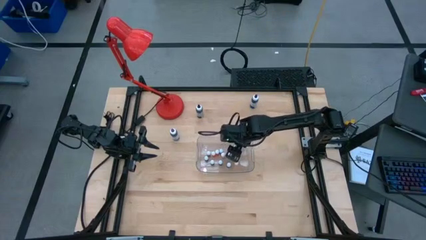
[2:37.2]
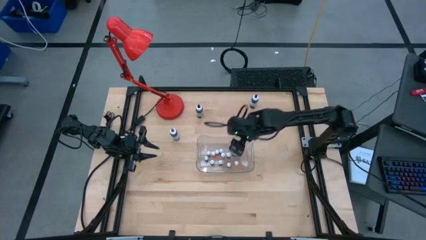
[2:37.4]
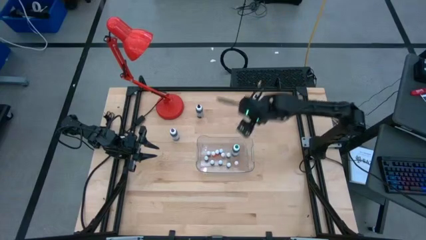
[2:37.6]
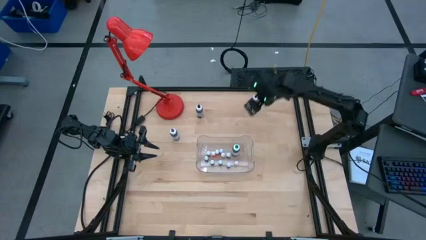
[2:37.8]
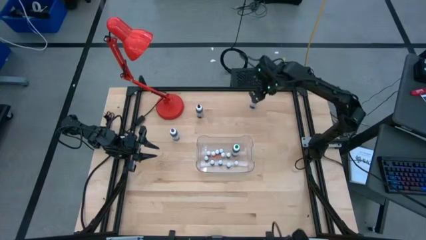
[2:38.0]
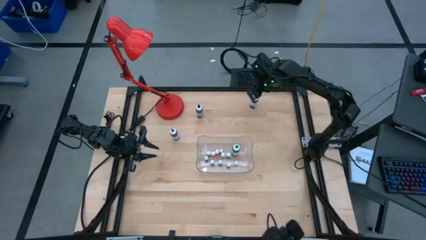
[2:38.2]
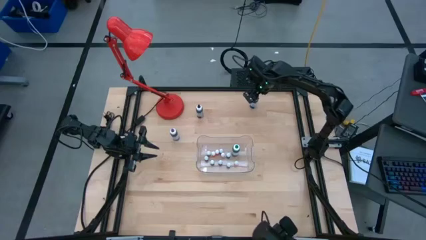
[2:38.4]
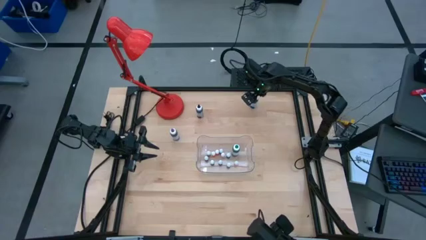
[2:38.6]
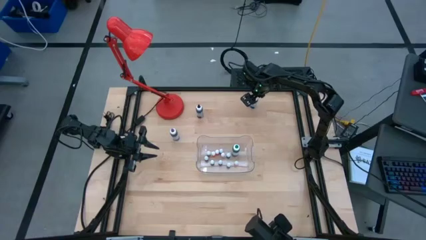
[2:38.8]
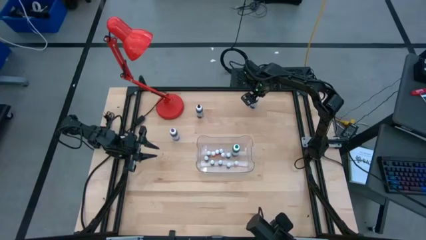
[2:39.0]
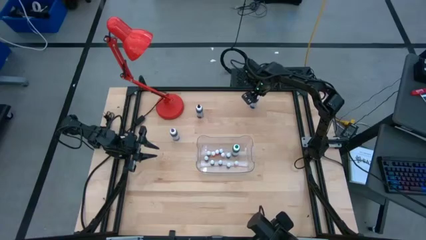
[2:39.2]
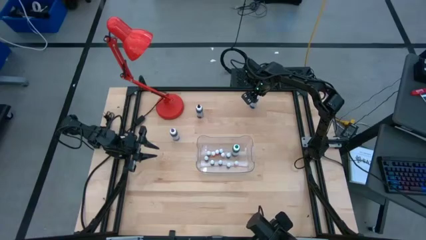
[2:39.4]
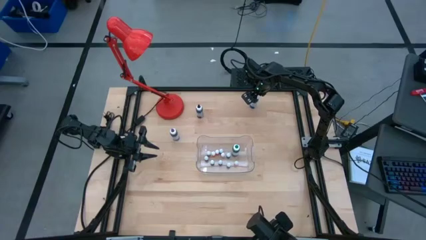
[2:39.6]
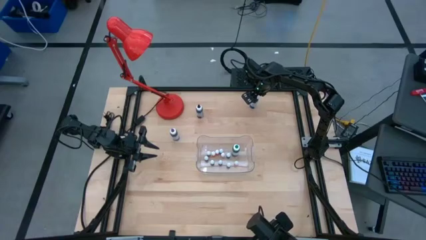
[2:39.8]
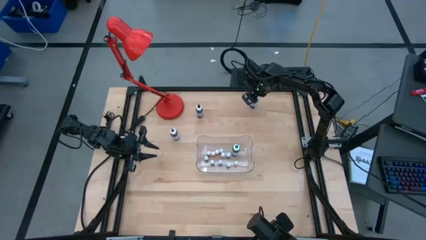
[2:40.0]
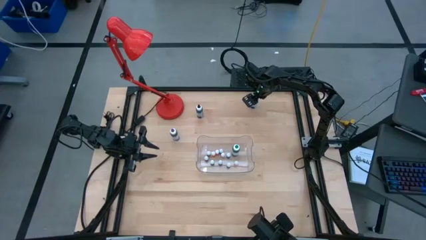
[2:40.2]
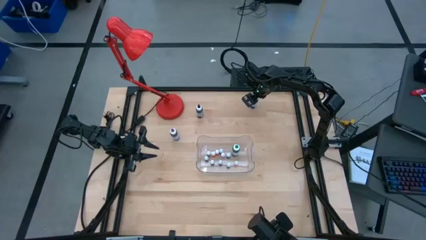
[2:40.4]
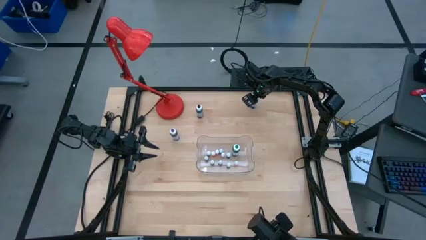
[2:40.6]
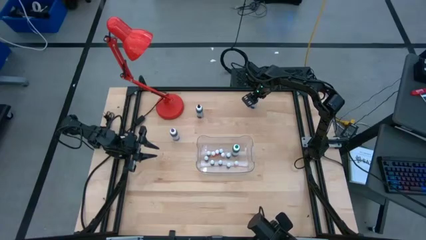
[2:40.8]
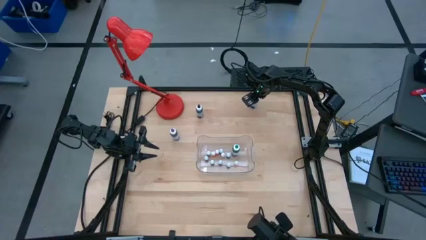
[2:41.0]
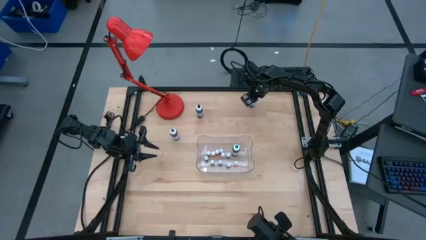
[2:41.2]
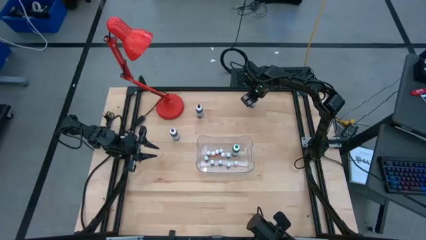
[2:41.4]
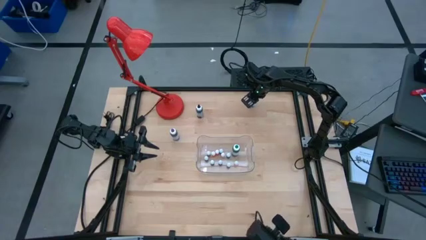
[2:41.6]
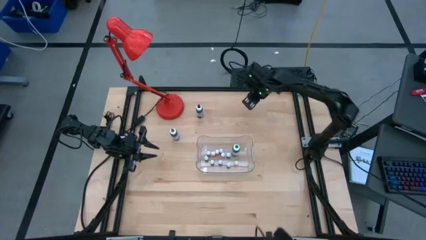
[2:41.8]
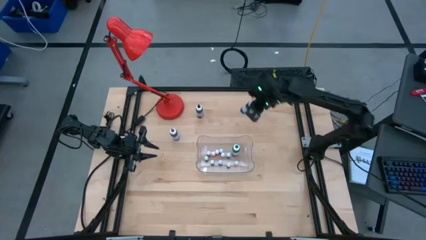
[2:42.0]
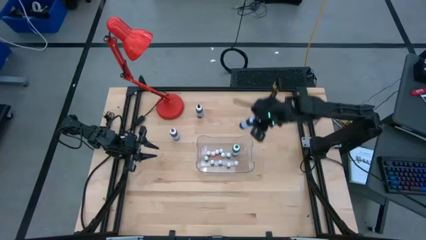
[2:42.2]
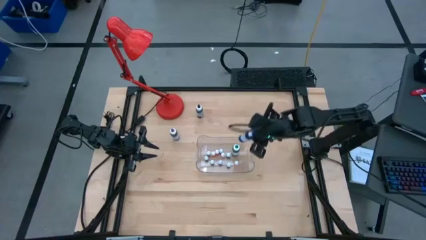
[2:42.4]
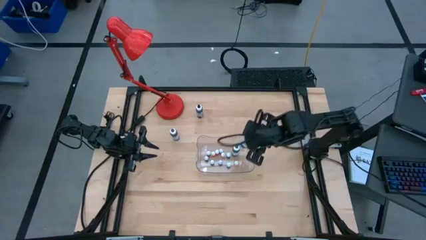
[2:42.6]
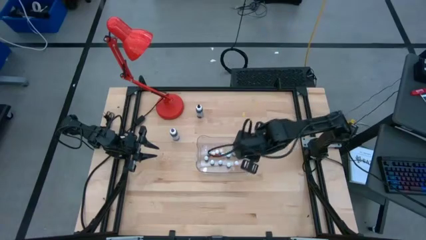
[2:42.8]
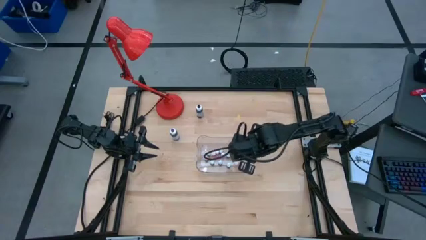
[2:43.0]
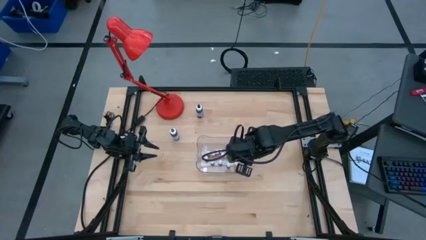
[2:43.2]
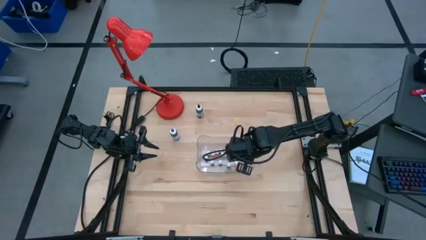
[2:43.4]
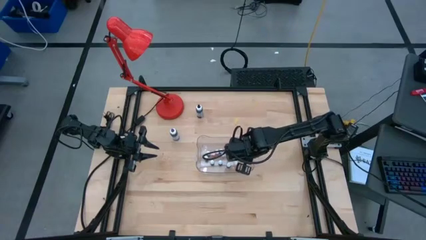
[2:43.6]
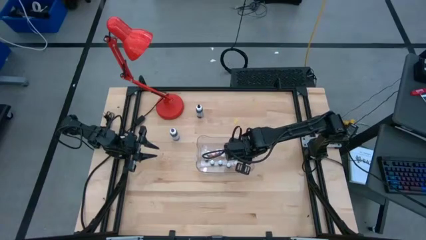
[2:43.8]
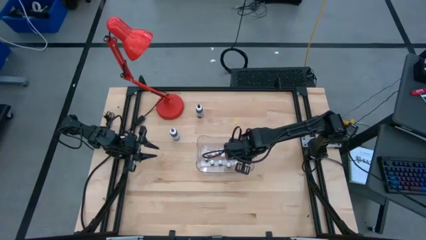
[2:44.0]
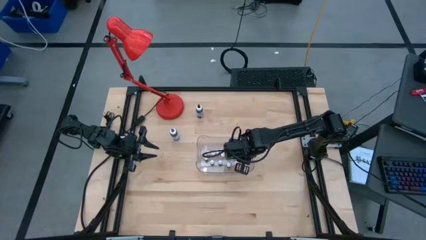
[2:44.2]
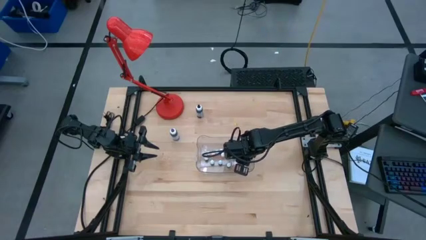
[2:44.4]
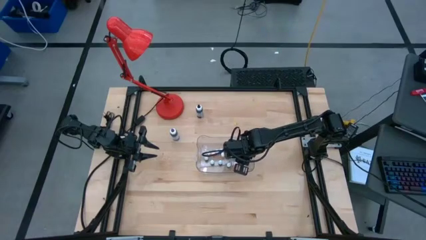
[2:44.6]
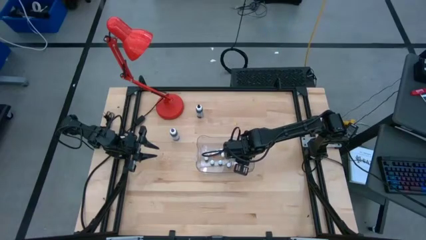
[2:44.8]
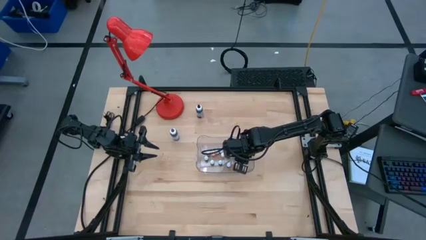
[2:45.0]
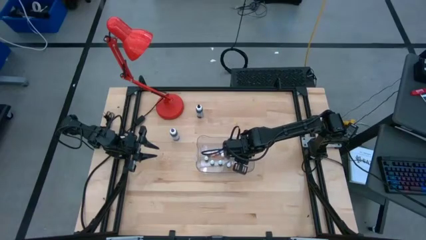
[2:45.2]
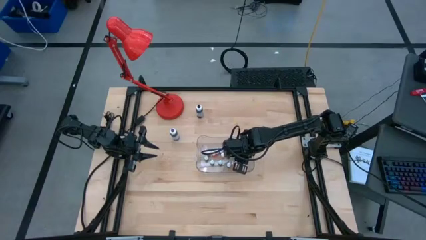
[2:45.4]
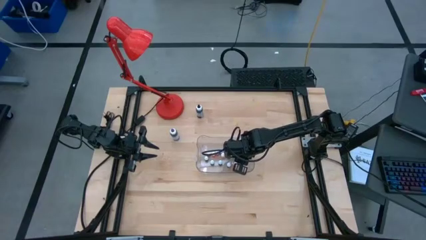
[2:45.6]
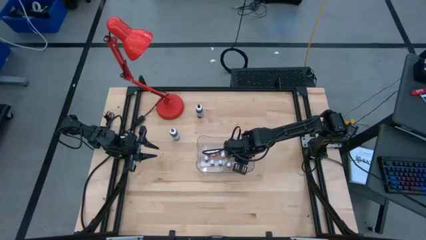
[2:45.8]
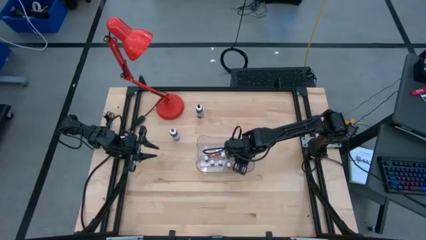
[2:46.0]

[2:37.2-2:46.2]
Task: Pick & Place food coloring
Put the large blue food coloring bottle into the transparent bin

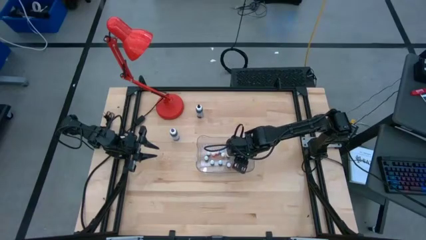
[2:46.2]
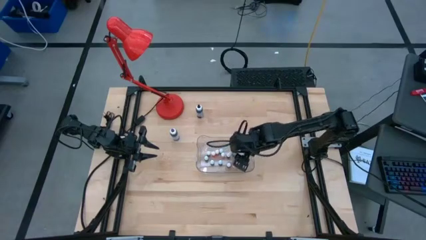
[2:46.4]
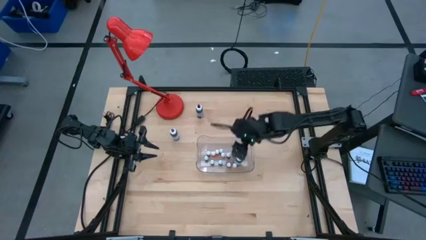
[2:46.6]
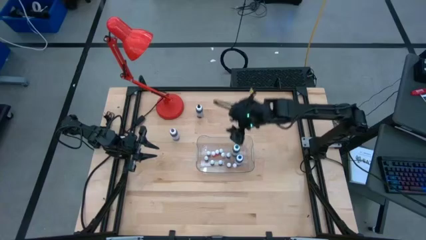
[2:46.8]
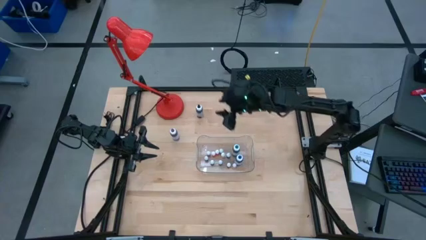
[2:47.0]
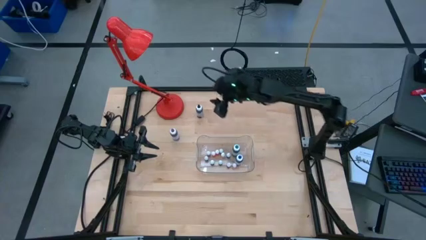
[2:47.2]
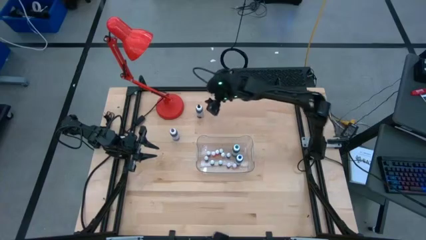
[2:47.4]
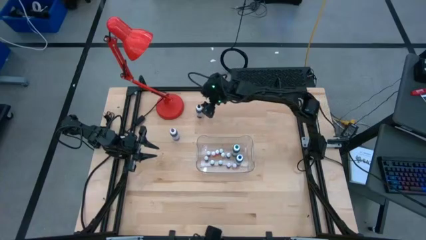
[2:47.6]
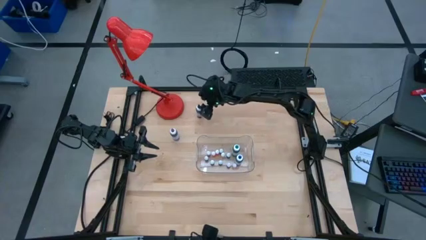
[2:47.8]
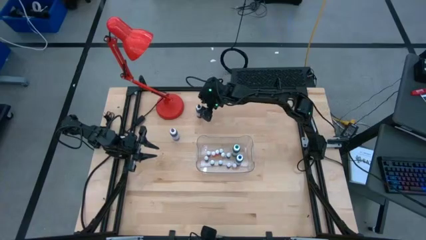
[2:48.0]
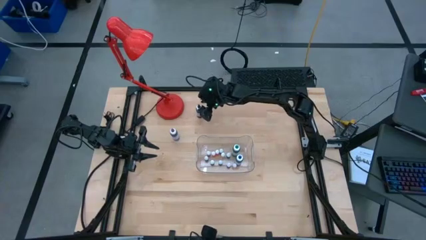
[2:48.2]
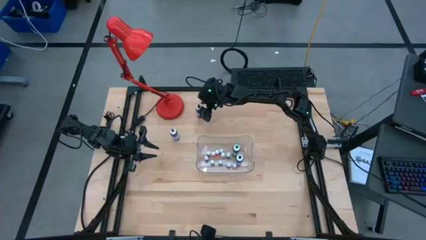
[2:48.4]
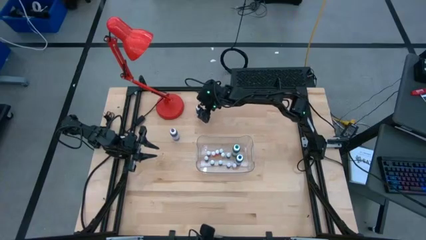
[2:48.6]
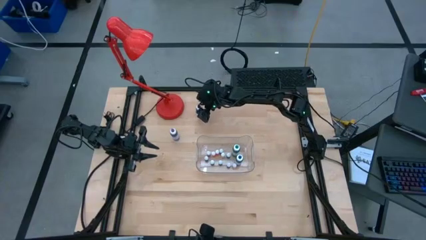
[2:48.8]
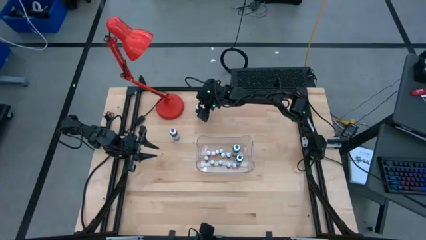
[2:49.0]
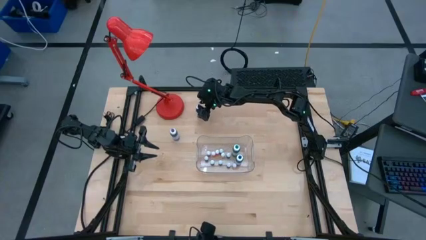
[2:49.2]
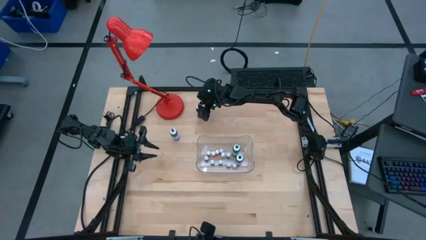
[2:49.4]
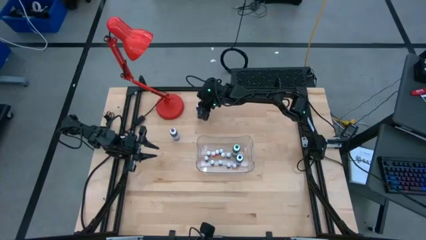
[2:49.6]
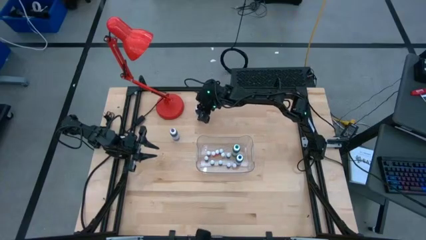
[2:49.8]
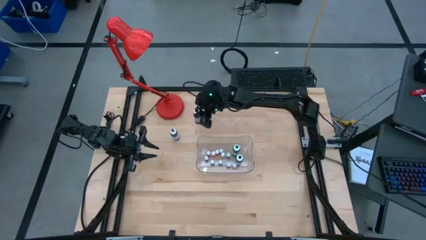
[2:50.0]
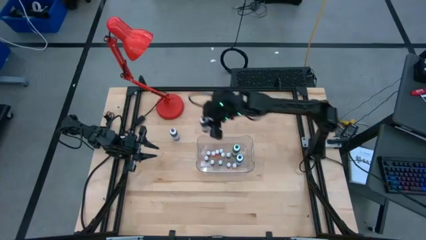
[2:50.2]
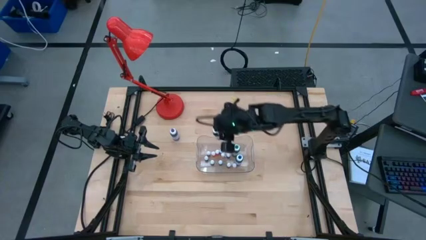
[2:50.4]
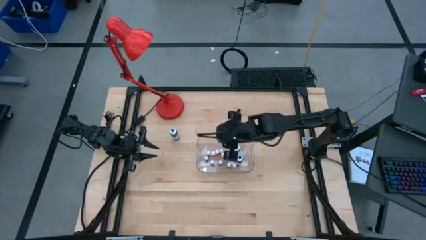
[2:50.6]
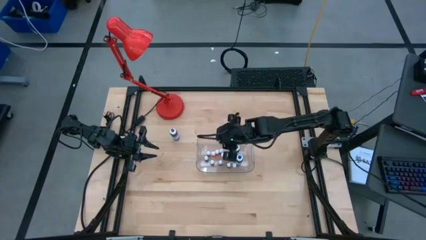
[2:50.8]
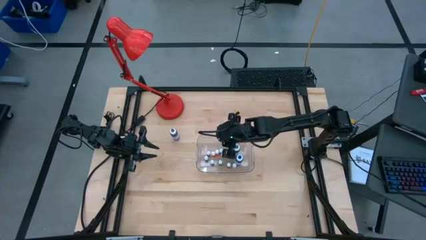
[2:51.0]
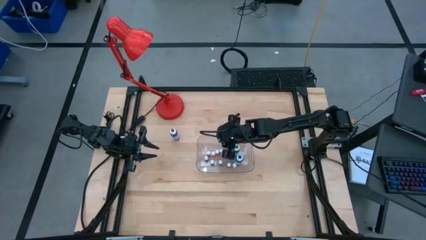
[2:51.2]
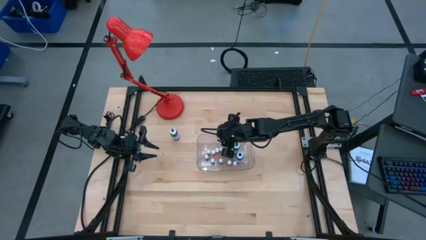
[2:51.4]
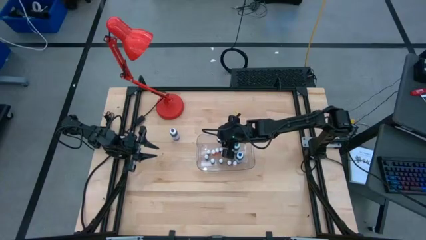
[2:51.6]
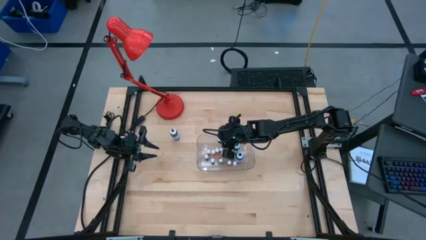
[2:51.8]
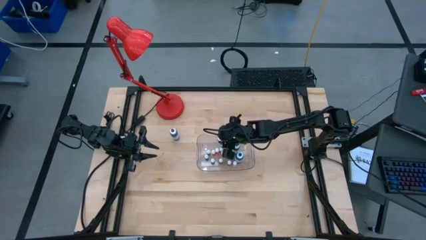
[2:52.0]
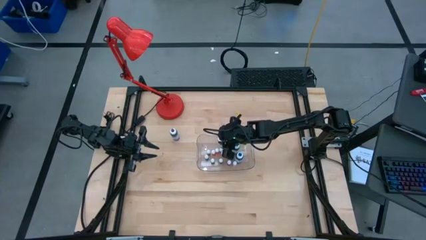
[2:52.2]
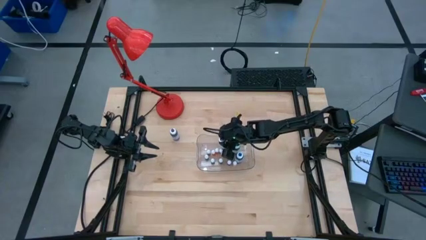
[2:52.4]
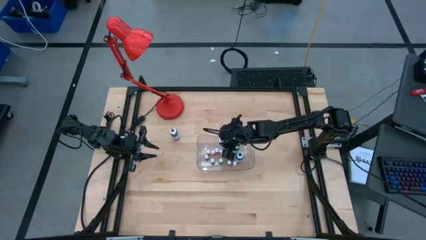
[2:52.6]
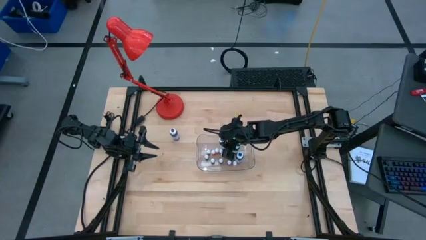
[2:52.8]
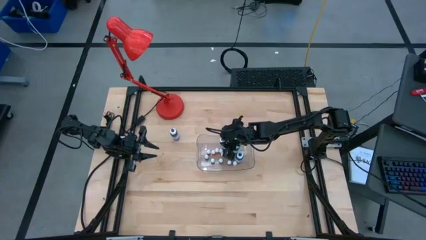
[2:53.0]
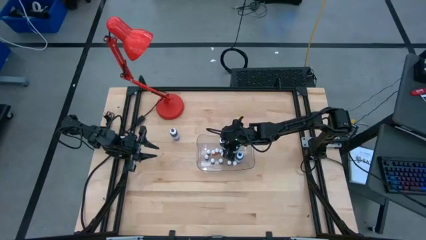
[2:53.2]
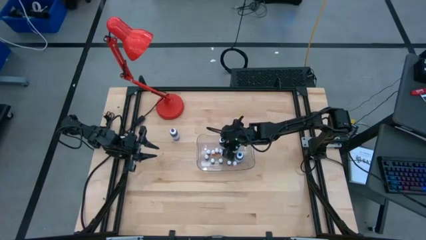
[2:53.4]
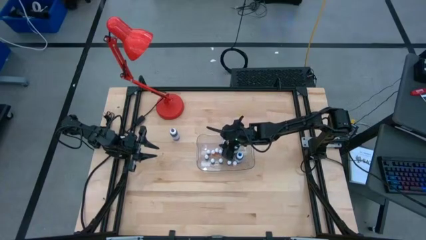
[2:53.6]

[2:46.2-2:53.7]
Put the large black food coloring bottle into the transparent bin
